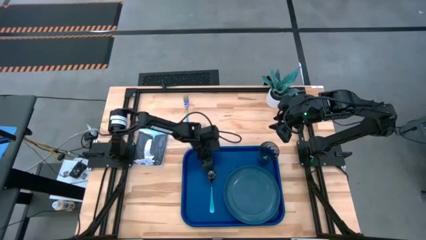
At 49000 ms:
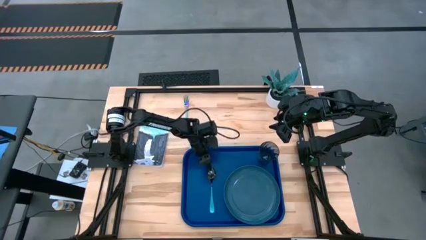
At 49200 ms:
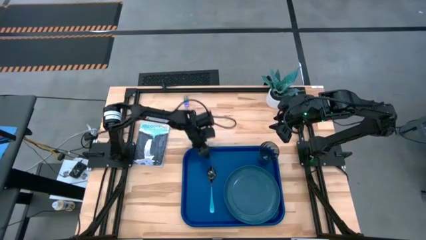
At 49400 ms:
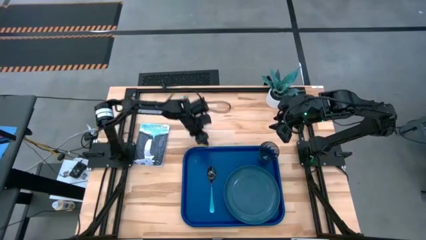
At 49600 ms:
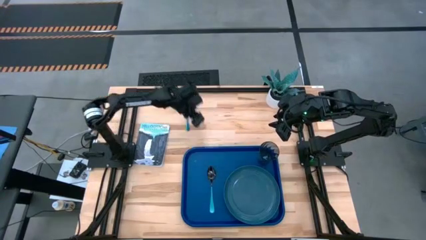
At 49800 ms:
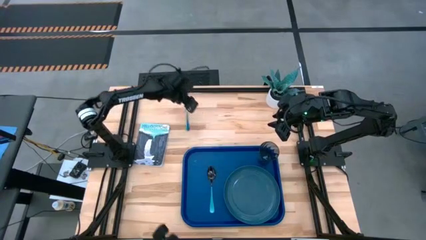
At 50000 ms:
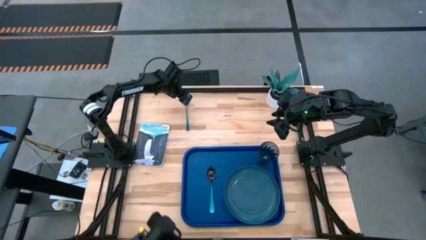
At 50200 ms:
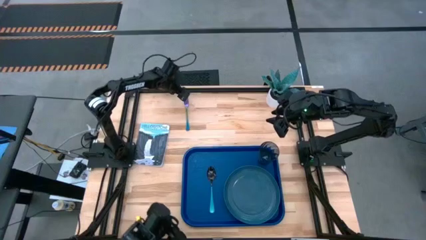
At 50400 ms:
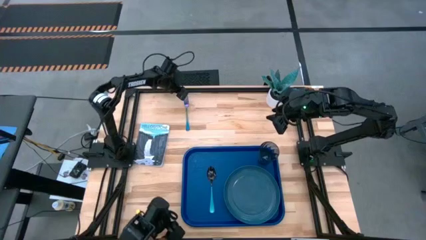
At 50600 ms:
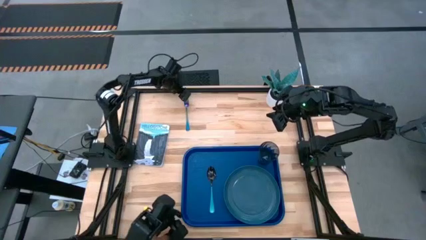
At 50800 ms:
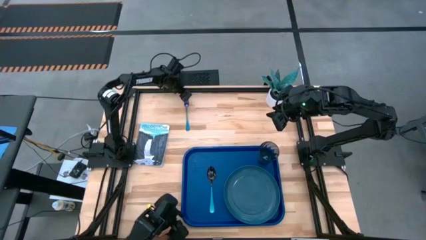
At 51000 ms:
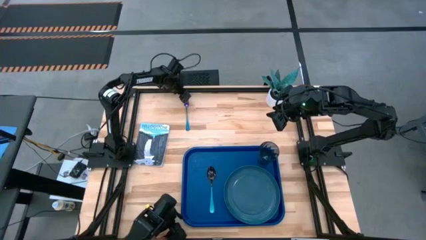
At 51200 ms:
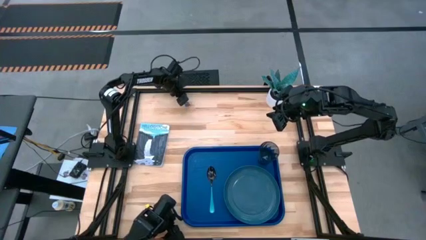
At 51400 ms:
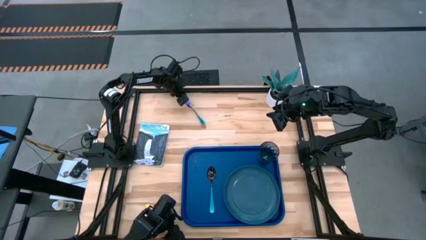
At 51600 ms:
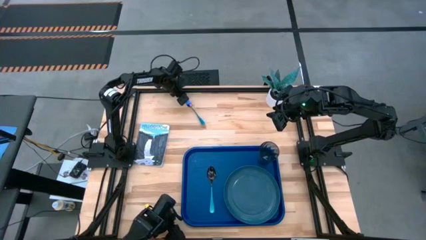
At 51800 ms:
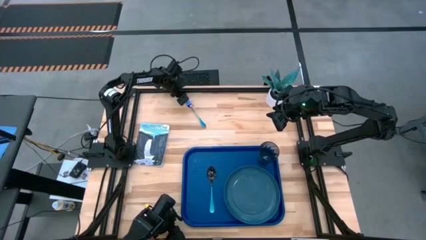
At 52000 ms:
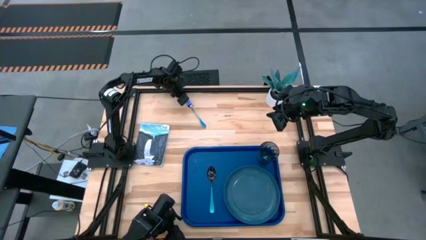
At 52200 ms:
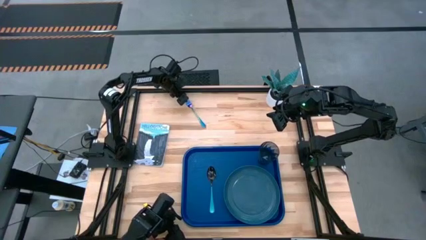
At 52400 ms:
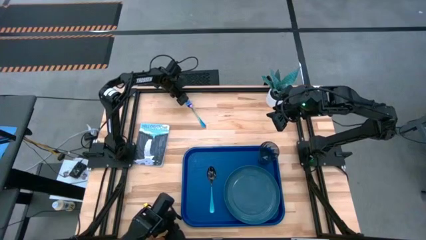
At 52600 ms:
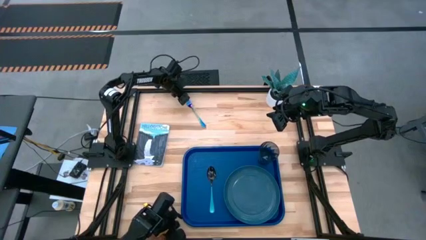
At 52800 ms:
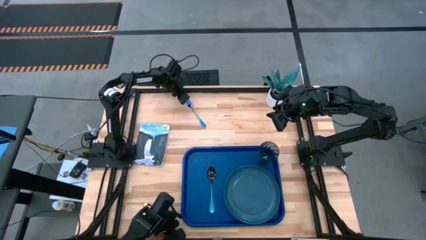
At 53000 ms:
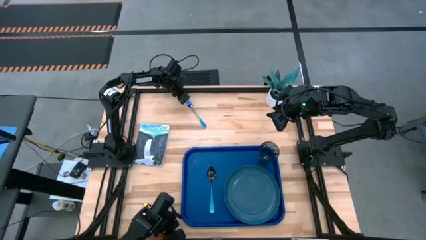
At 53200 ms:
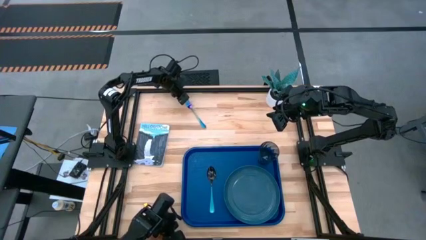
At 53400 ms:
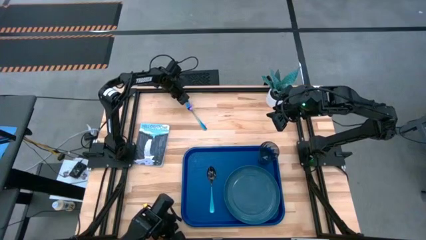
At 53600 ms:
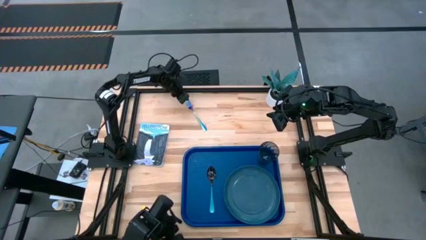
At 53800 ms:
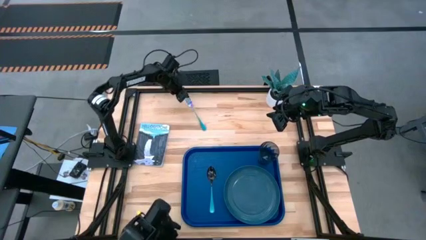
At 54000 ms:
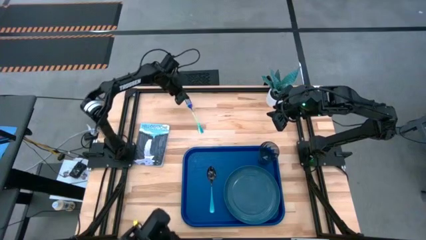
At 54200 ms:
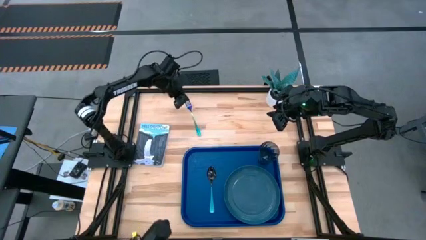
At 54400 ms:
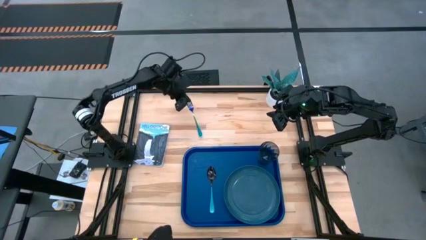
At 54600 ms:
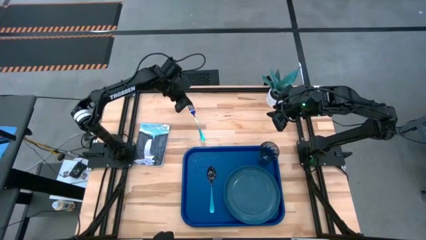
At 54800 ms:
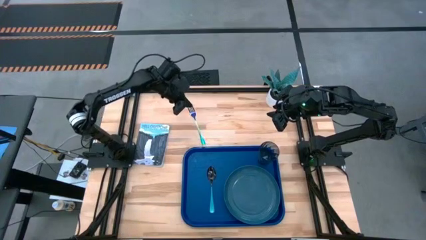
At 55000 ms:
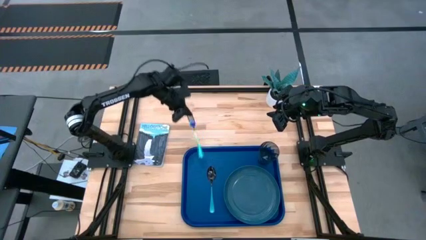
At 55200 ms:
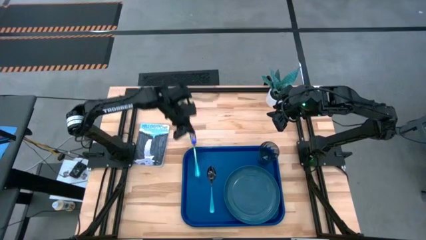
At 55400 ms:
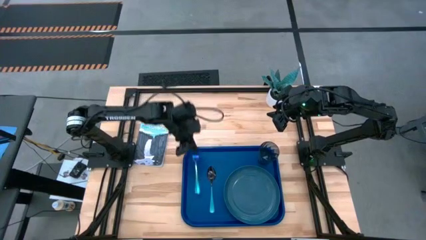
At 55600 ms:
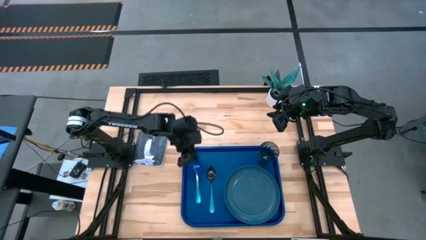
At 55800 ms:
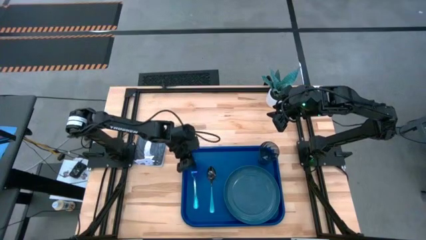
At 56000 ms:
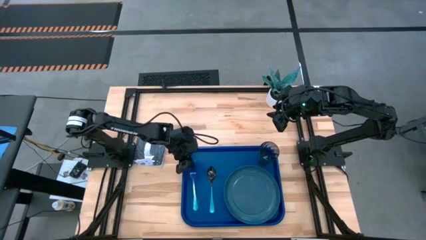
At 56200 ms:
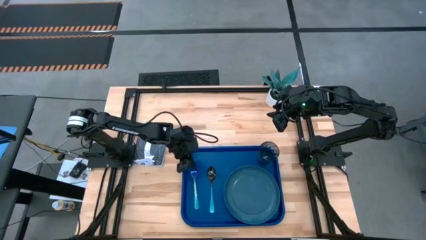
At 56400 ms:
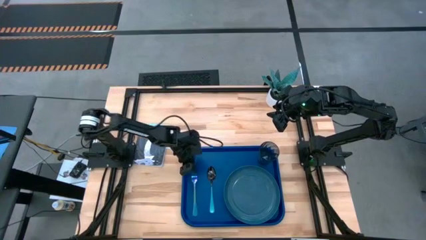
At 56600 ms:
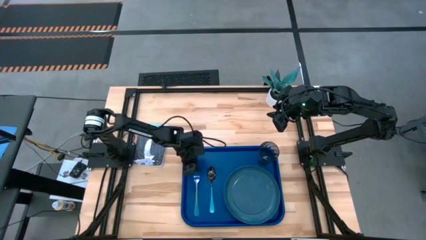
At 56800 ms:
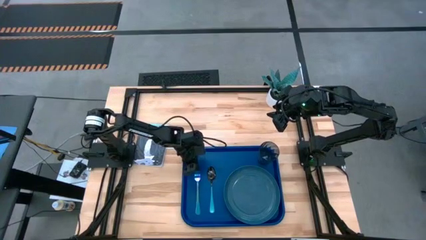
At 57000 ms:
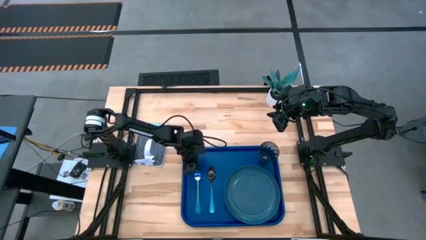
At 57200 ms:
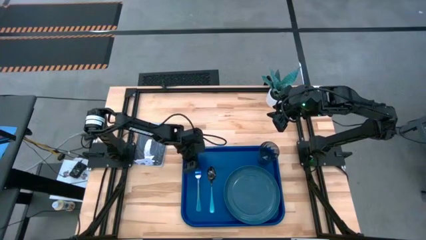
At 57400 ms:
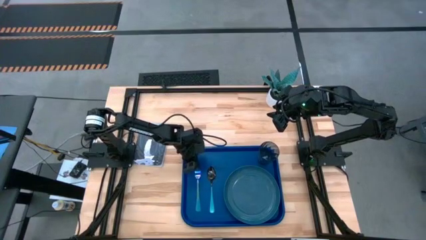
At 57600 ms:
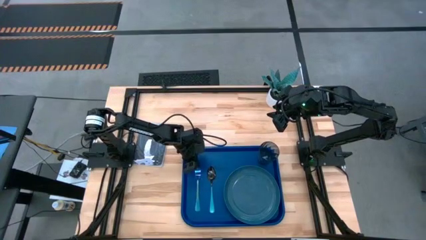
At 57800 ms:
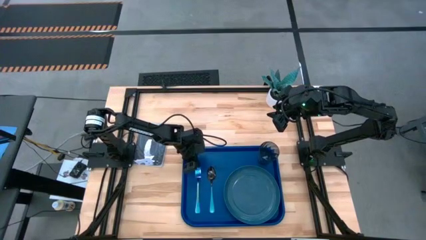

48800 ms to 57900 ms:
Task: Pick and place plate/cup/fork/spoon on tray
Put the blue fork beside the blue spoon on the blue tray

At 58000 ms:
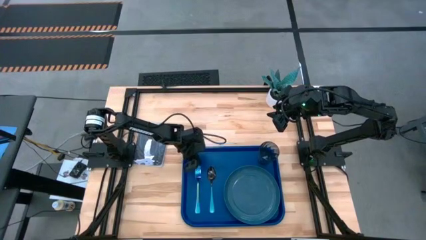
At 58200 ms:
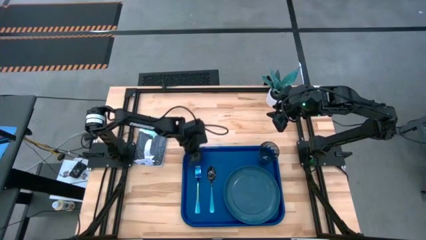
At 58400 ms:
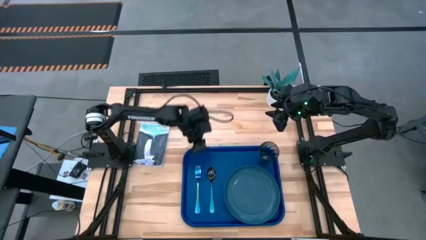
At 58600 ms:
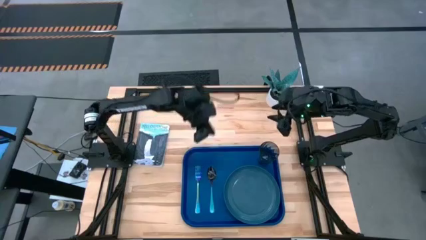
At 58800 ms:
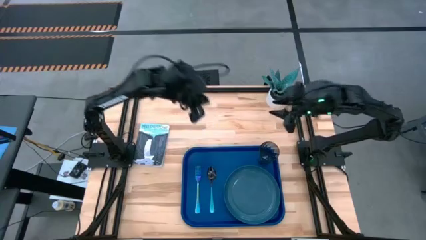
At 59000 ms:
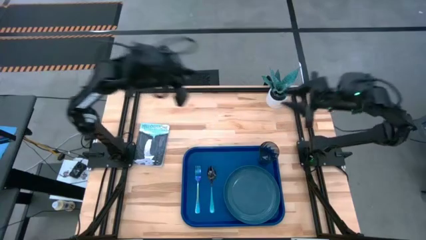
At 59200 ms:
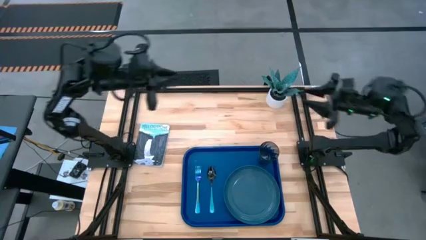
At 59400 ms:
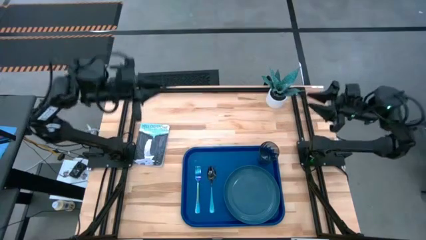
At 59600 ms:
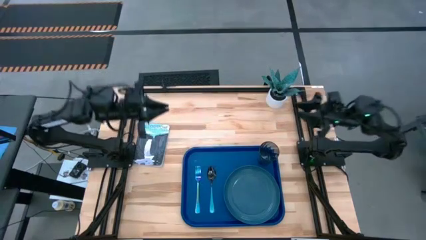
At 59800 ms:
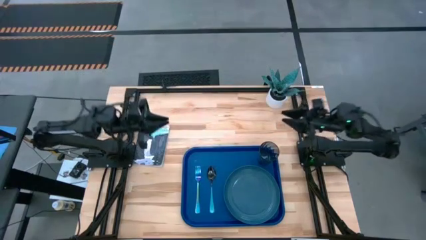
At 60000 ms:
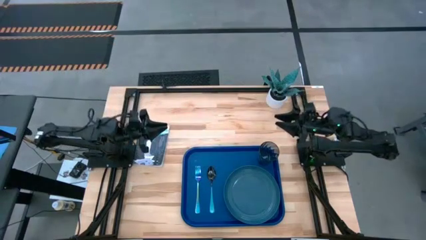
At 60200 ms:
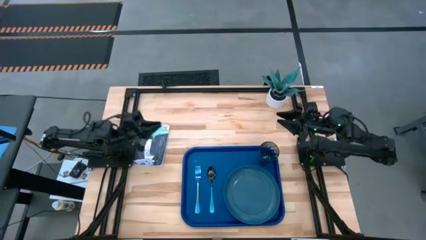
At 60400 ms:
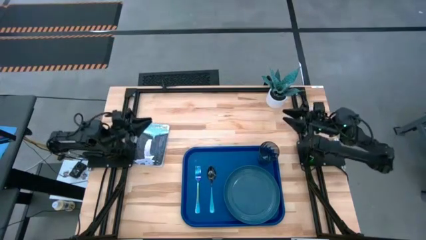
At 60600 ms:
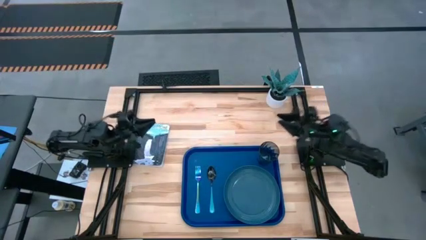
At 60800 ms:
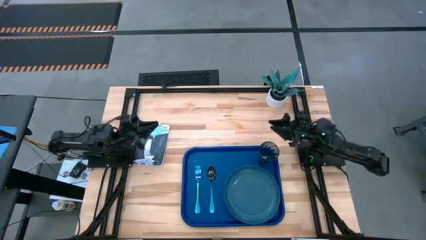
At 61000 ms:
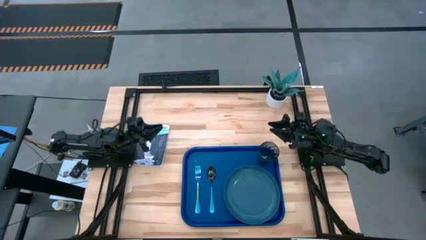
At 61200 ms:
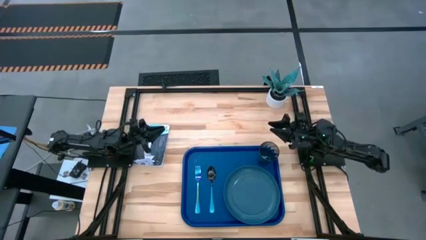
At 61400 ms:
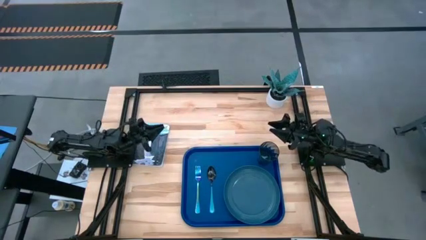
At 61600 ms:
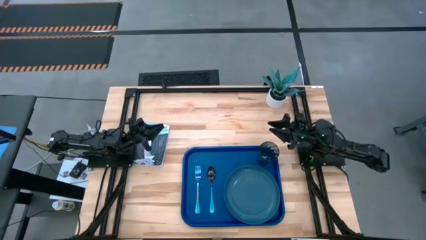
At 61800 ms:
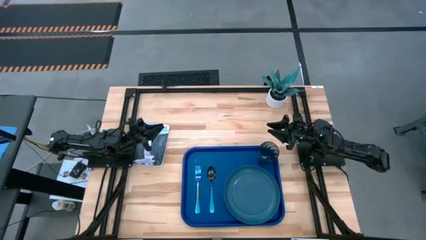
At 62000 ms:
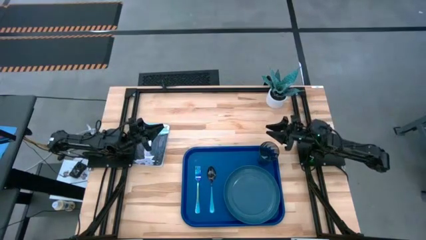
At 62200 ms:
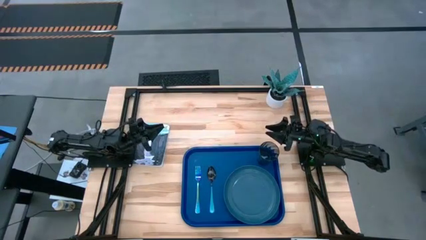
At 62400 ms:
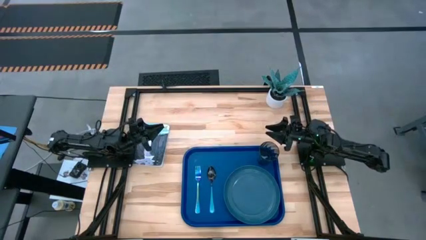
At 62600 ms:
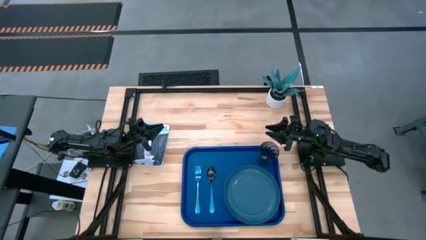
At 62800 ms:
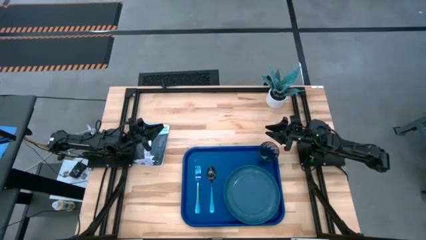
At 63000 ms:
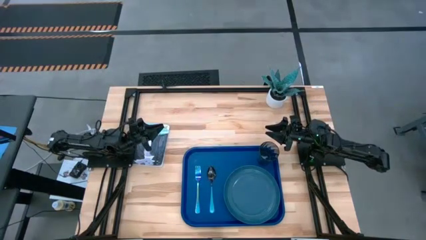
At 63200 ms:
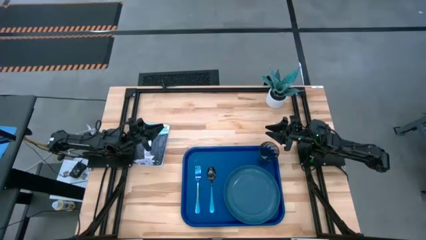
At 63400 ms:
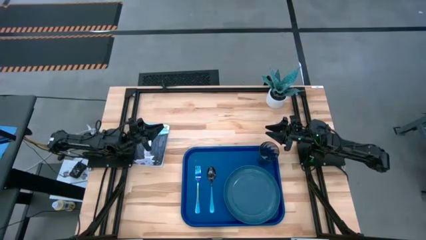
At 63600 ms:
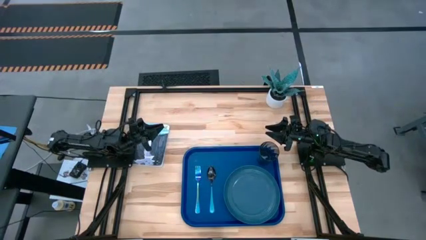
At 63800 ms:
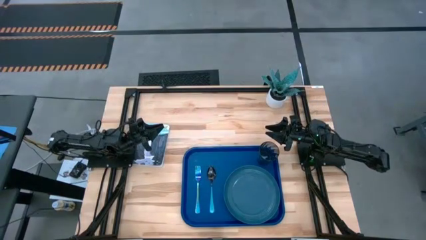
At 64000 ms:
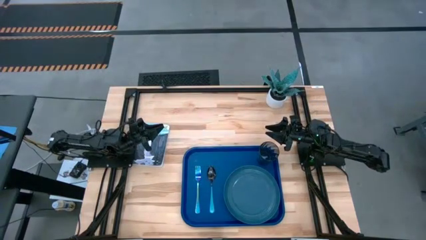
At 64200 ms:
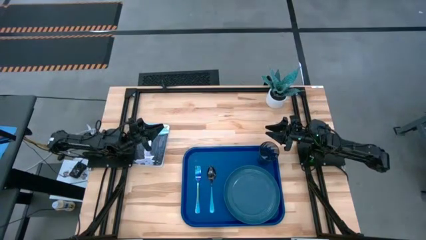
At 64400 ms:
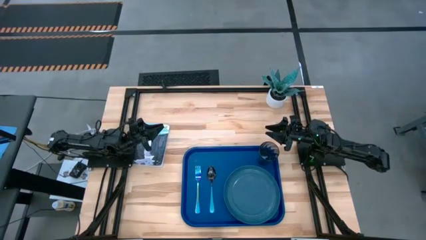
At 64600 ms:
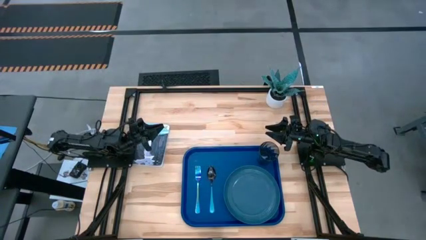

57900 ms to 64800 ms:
Return to Home Position
